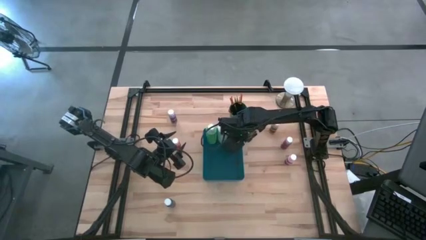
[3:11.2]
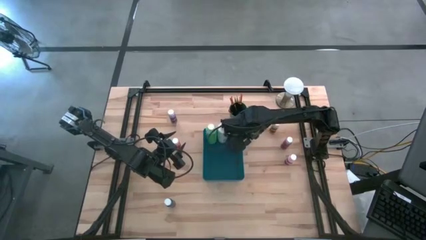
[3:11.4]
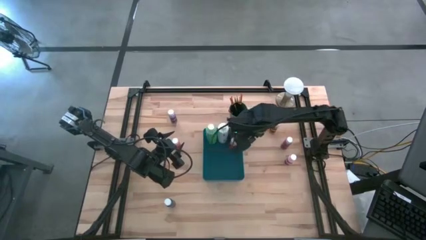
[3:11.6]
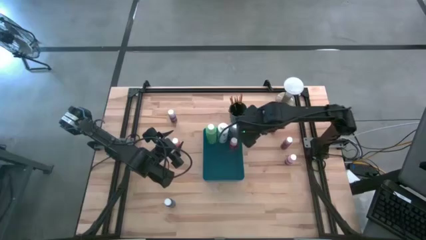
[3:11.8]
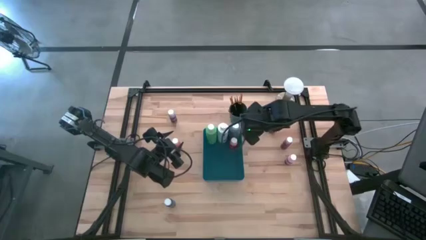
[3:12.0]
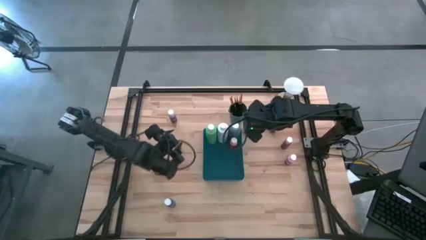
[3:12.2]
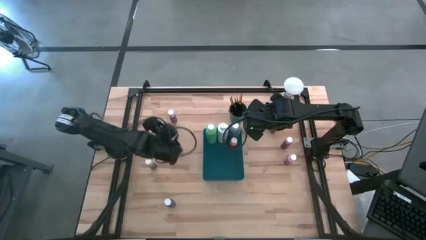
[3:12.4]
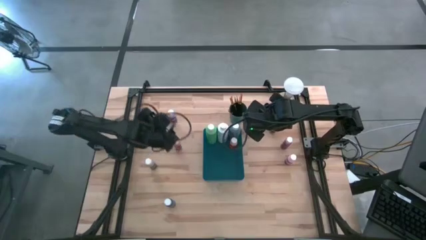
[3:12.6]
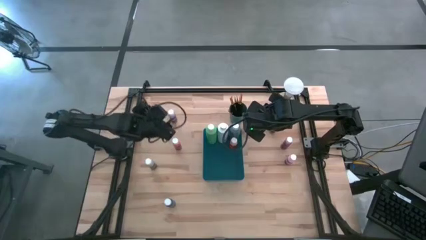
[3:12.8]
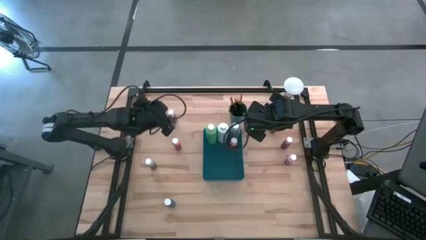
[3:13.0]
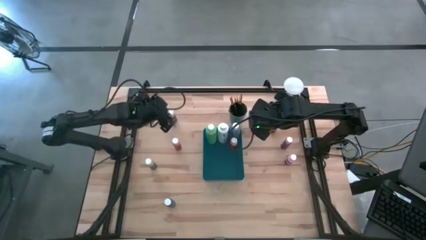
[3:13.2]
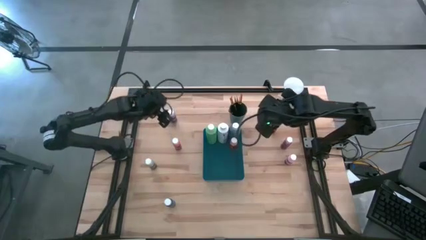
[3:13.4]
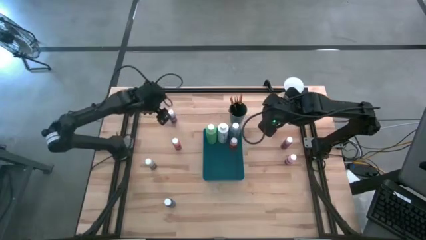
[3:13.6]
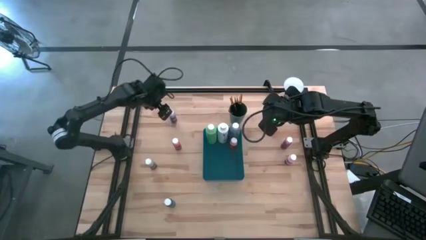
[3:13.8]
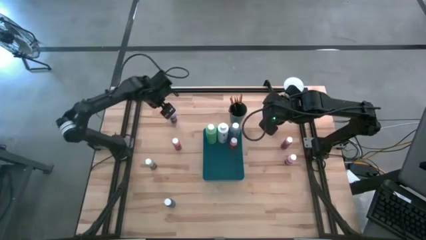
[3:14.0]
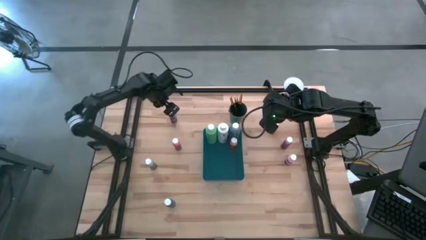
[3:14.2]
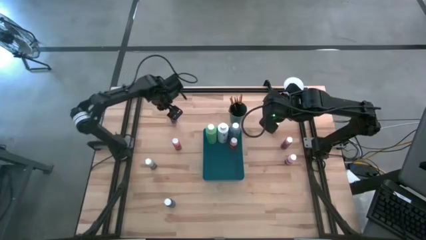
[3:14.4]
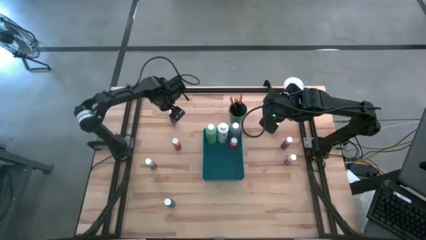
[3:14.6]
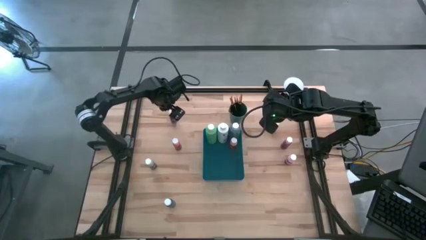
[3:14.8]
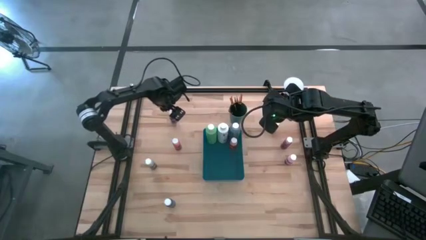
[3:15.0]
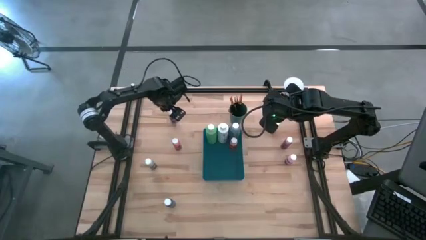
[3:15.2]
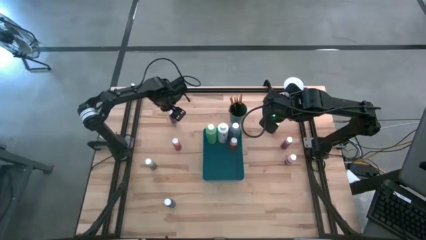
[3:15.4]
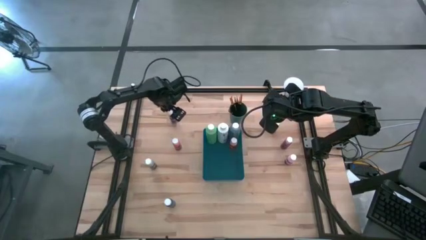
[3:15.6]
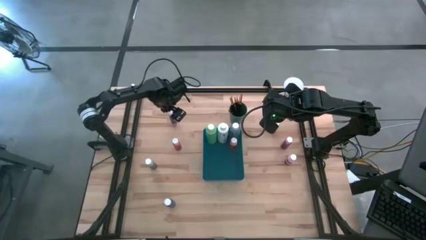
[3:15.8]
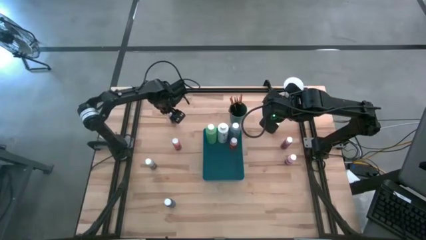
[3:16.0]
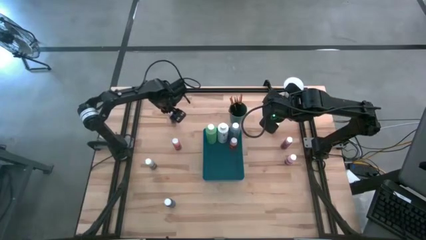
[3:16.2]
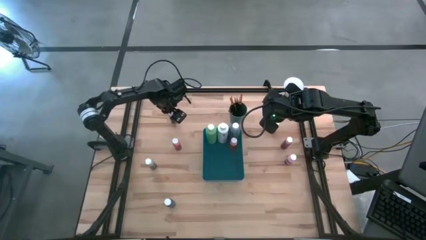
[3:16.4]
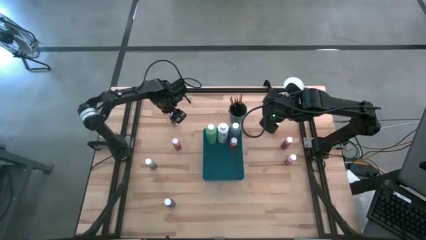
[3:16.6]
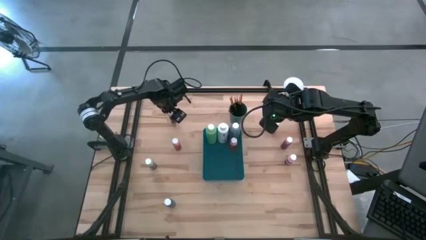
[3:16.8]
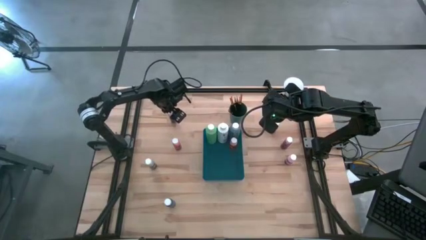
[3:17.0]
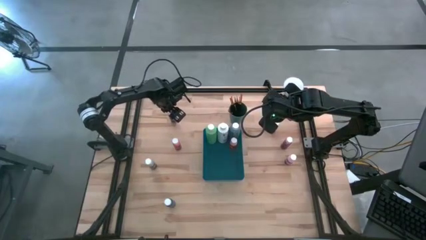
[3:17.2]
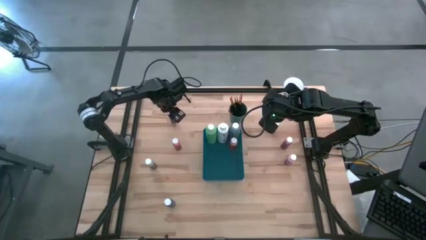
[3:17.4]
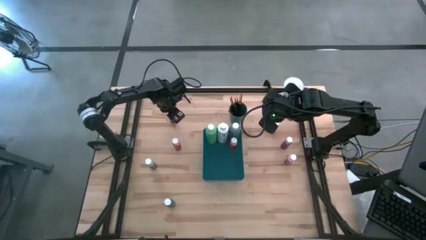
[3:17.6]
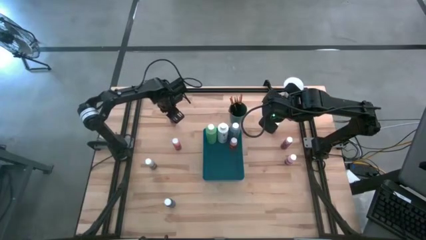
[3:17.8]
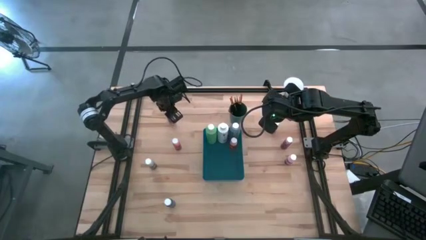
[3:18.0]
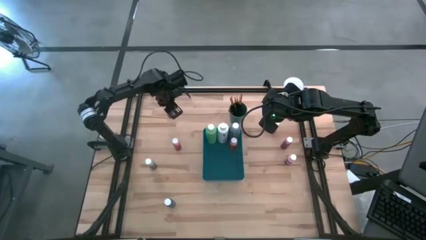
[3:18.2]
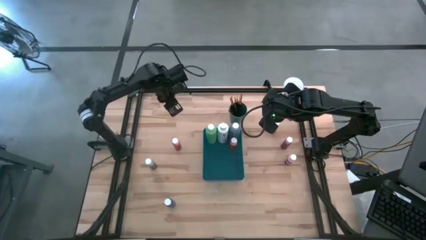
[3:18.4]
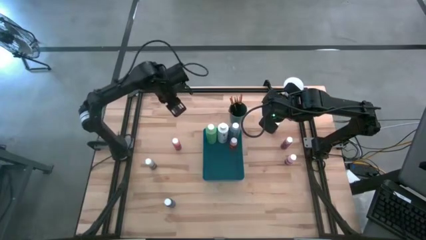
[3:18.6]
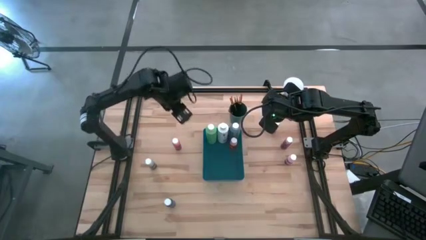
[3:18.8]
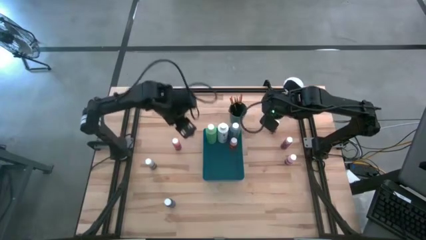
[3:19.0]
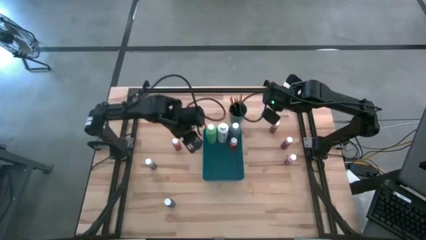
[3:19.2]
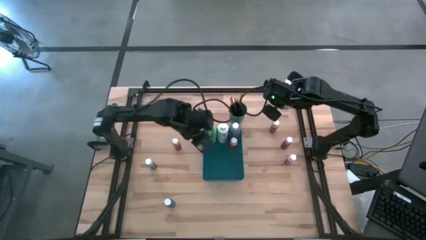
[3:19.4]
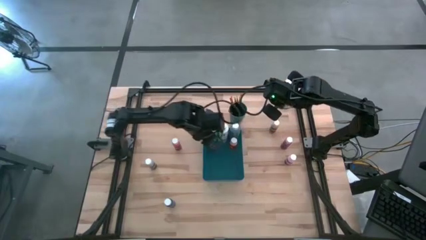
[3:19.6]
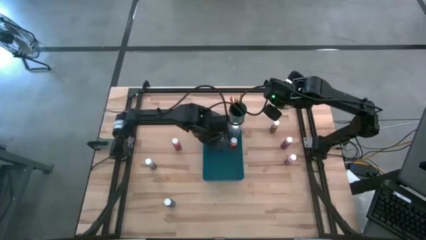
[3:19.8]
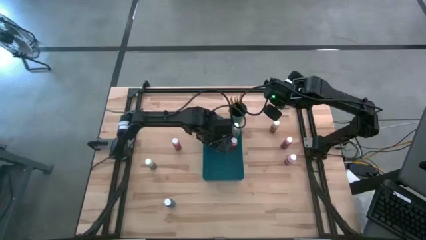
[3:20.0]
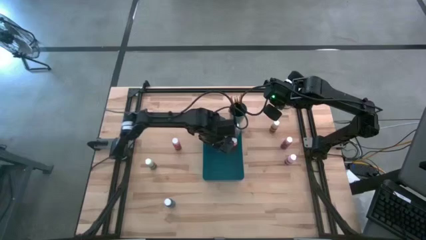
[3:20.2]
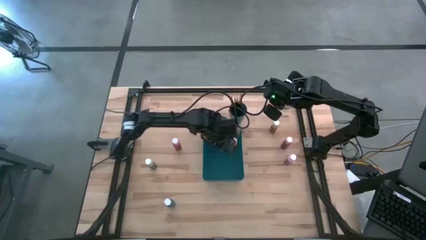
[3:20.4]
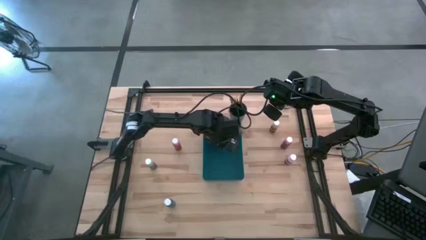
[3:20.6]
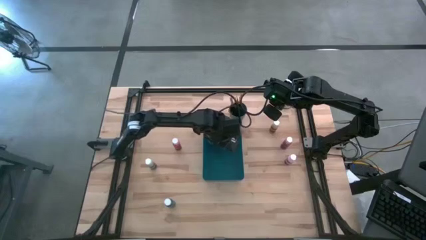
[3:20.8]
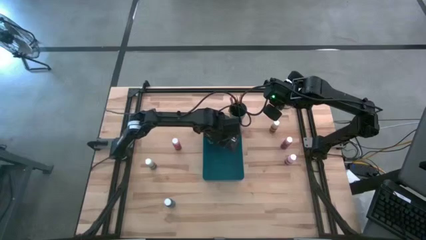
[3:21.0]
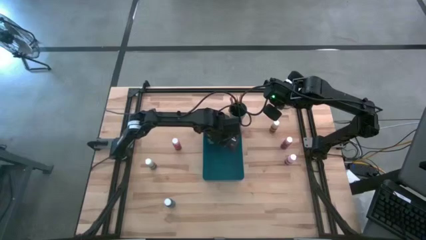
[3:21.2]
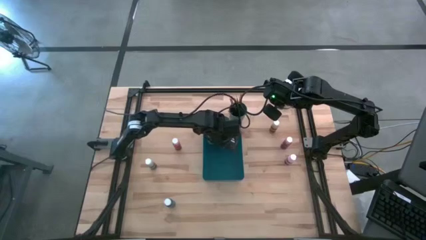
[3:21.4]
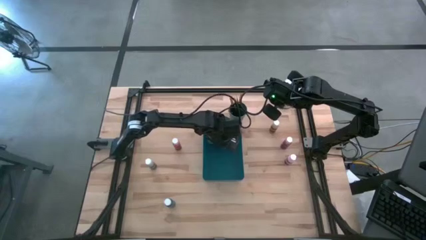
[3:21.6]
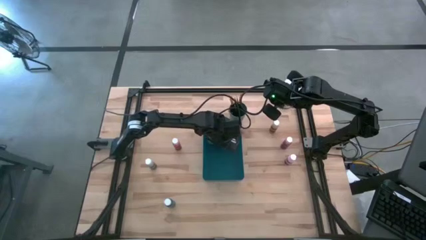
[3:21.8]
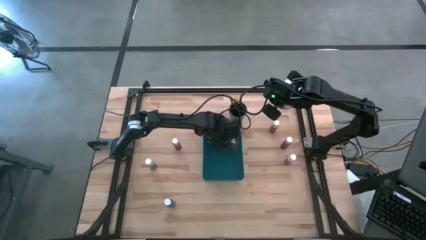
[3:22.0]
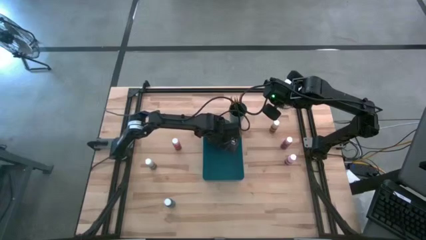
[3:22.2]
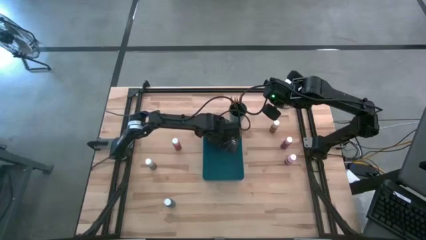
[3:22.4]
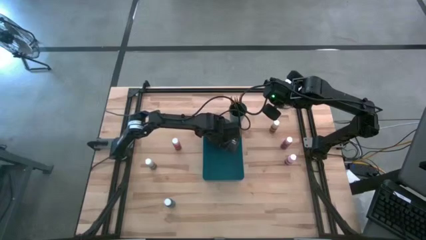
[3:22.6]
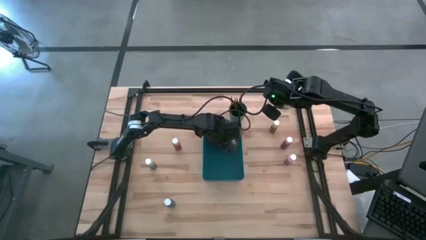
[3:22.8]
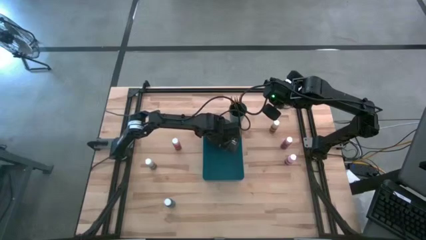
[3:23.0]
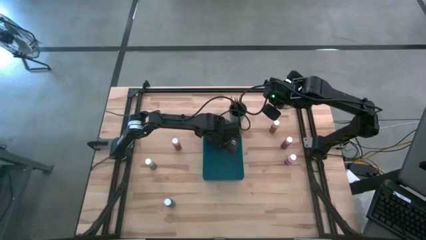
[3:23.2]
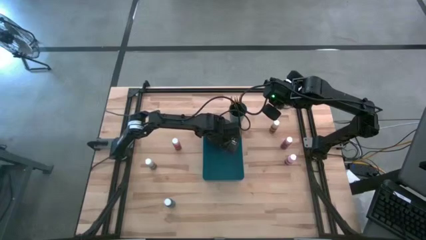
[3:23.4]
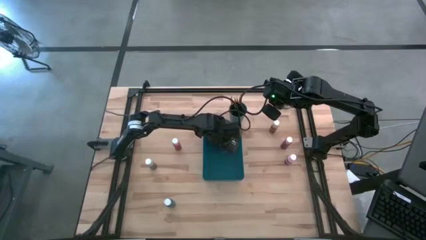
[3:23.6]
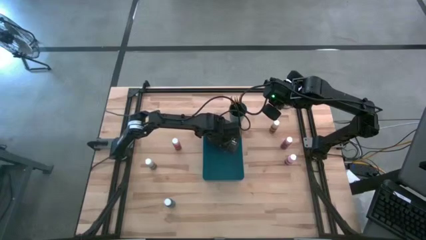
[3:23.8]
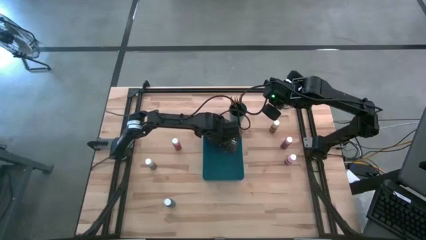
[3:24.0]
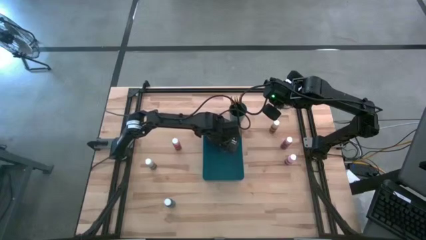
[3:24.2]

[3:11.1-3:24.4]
Task: Pick & Place Paint Supplies
Put the small purple paint bottle into the blue bin

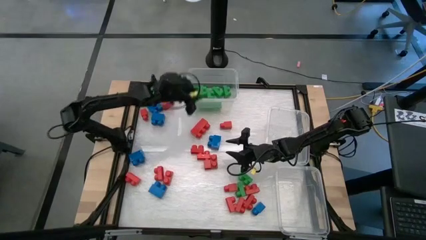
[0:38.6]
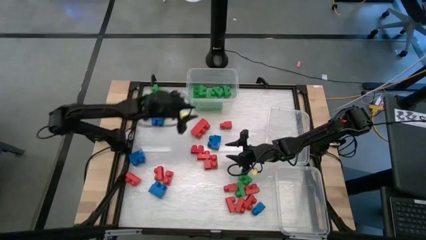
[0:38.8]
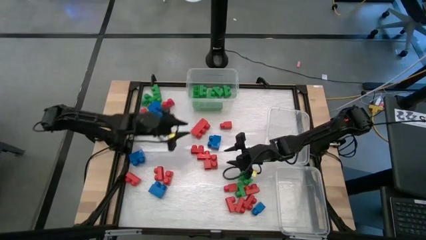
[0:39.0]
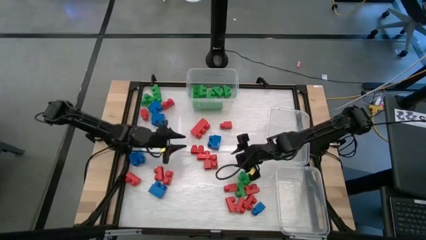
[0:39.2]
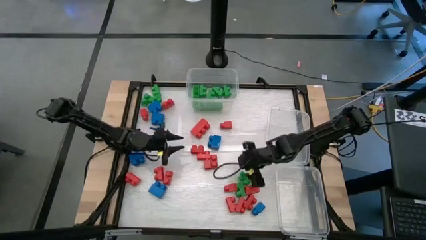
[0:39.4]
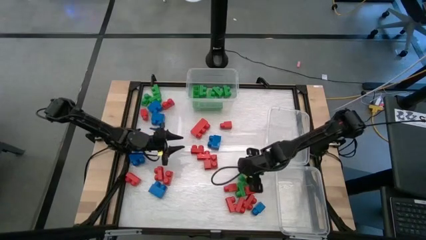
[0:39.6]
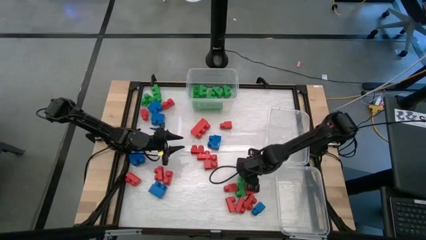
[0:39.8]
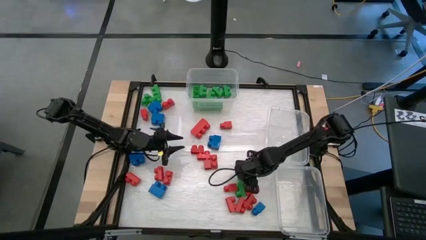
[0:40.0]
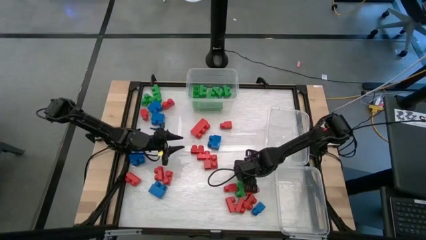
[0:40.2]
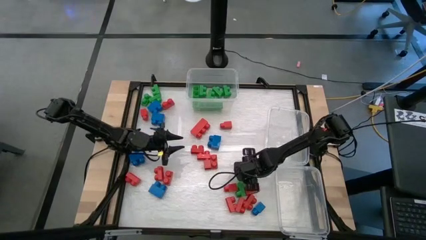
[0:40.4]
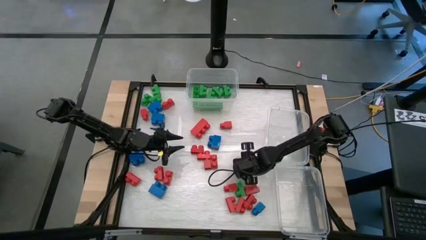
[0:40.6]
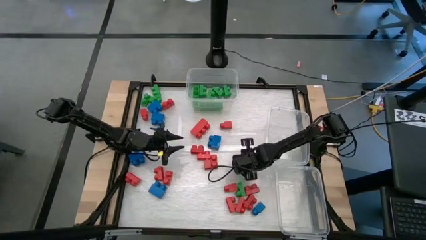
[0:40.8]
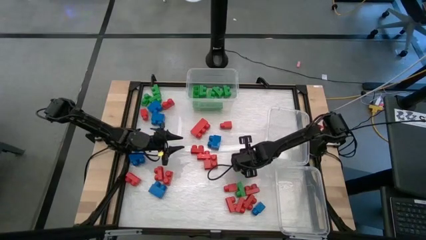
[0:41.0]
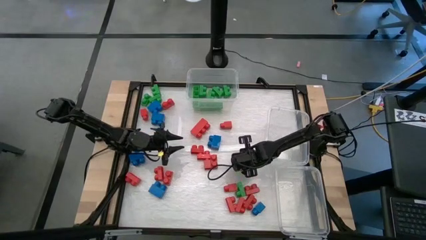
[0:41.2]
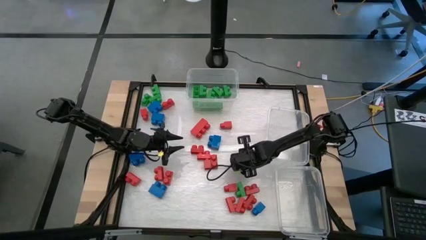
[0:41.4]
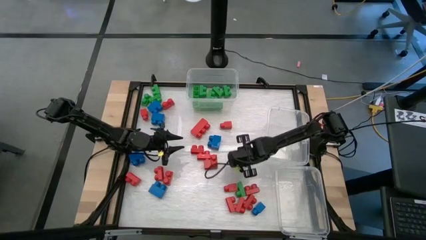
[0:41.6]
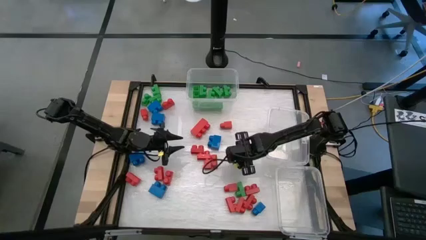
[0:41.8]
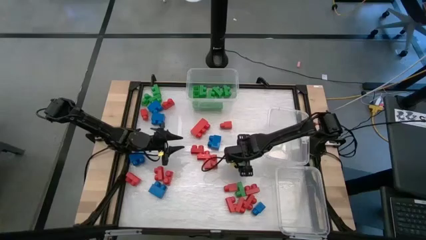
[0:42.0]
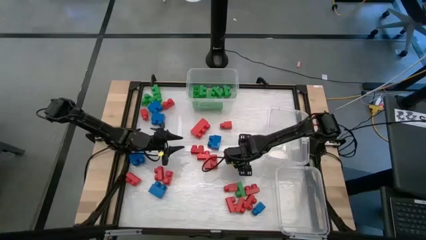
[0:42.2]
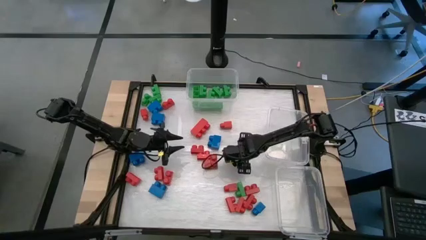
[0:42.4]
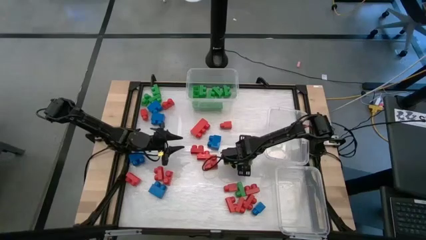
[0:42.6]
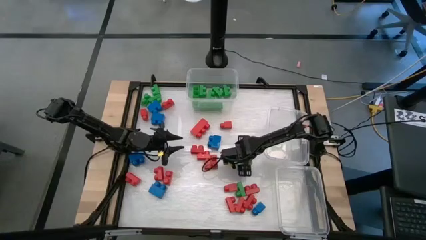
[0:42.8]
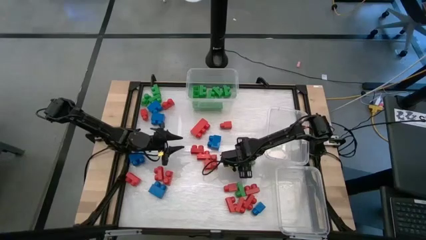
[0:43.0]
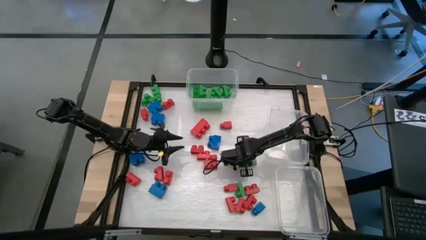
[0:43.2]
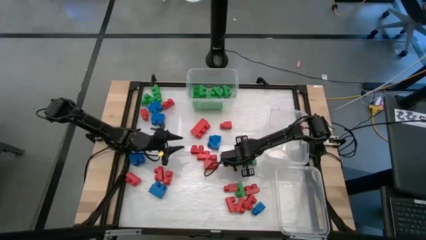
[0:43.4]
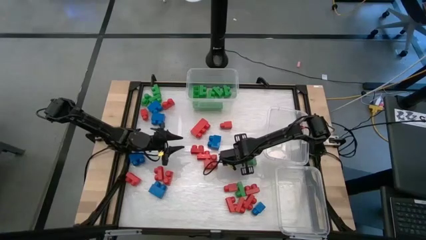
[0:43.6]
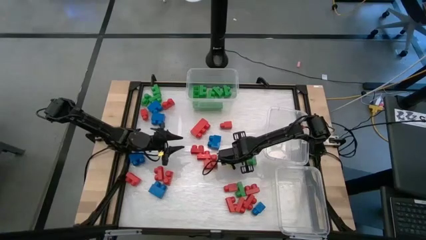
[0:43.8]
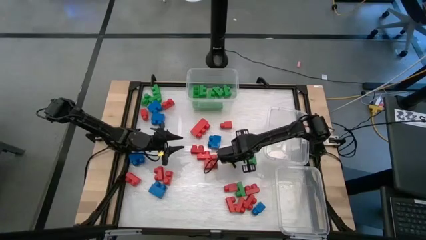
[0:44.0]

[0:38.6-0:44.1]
Task: Sort blocks
Put the green game piece into the top transparent bin
